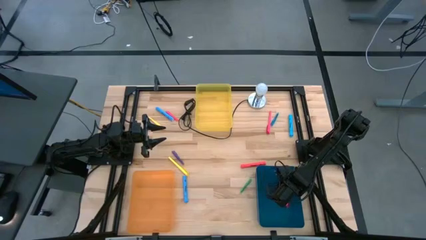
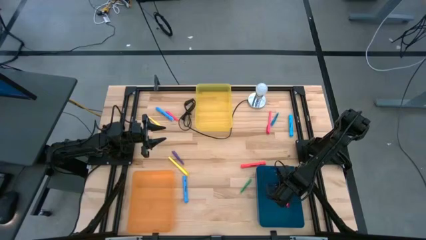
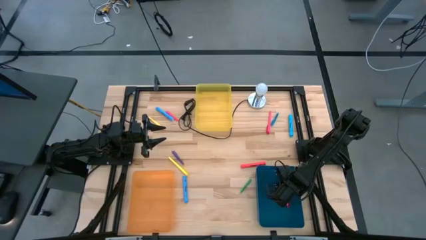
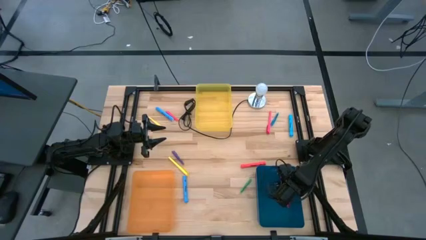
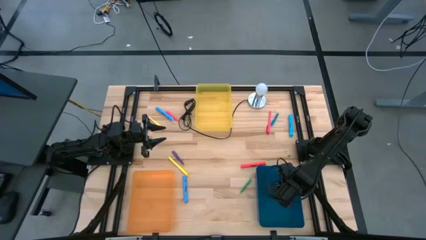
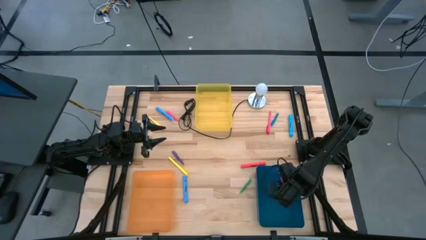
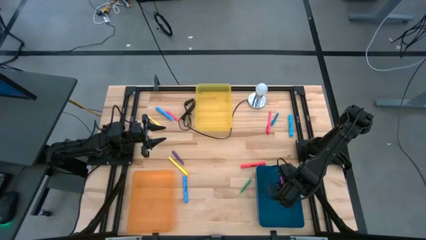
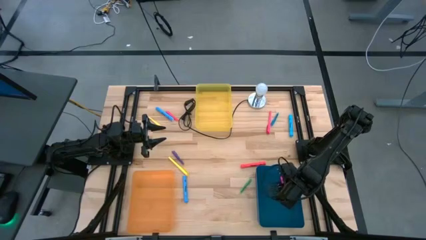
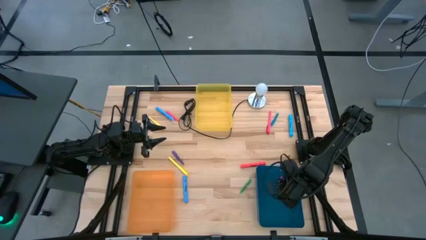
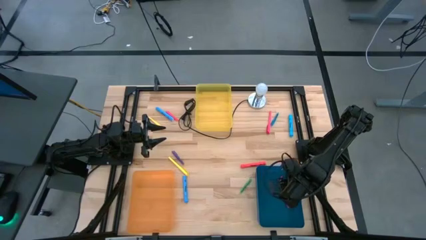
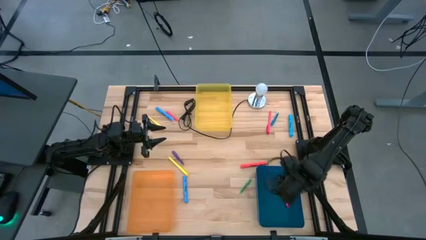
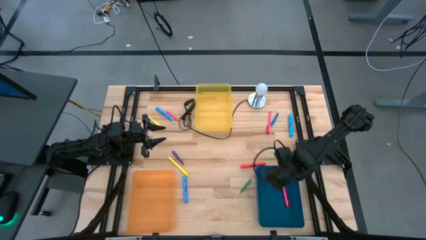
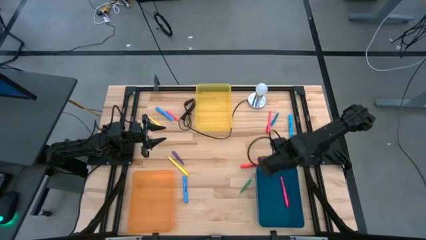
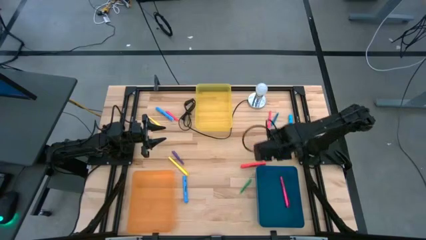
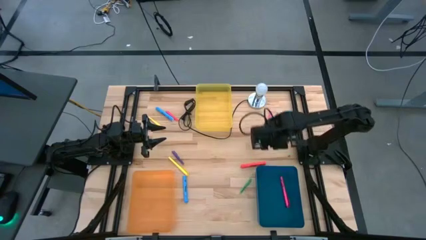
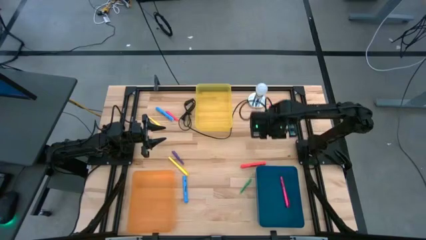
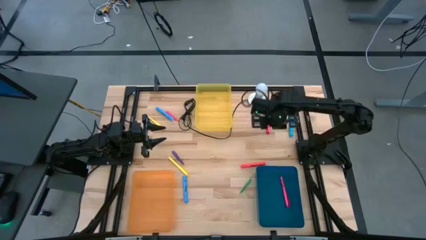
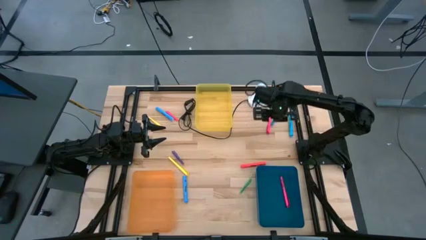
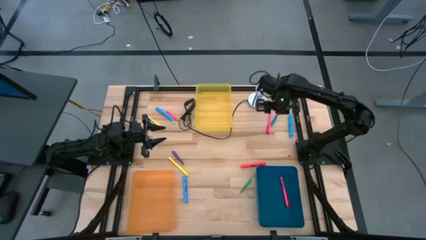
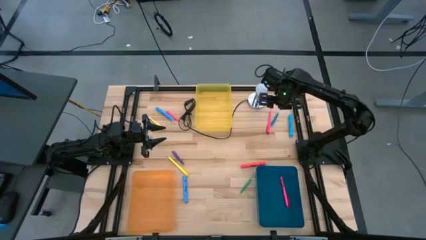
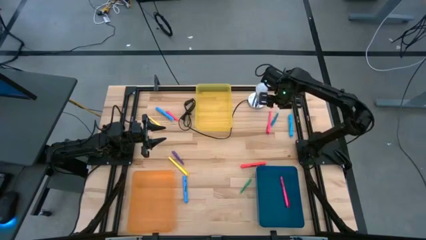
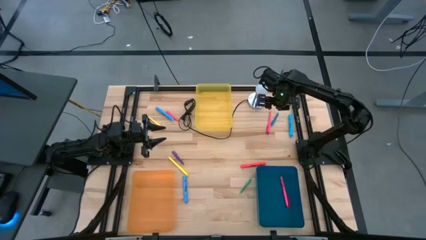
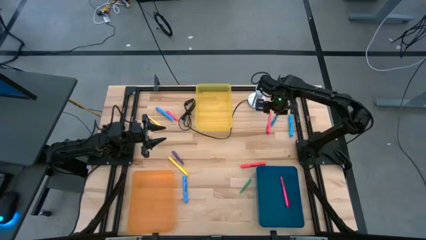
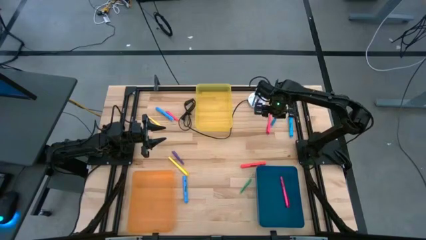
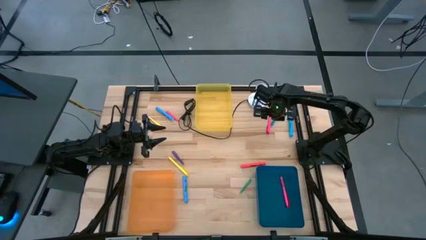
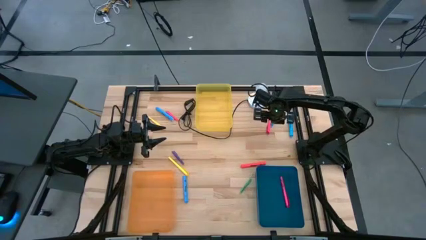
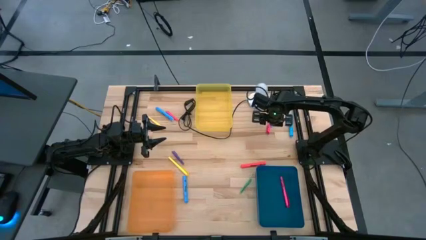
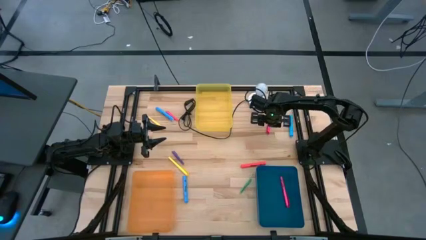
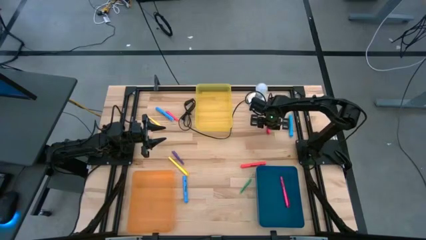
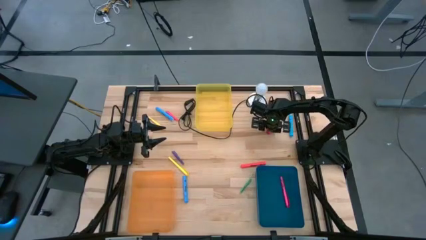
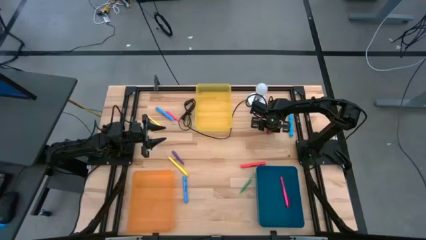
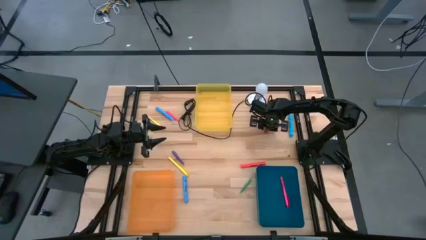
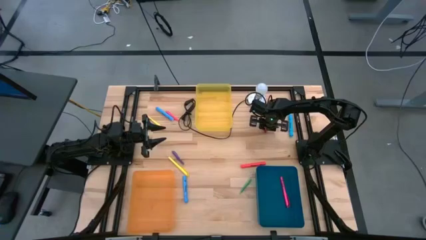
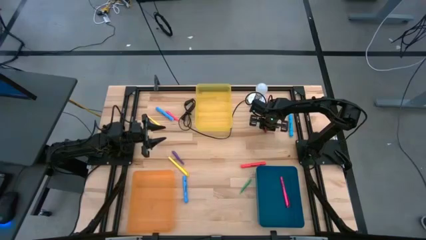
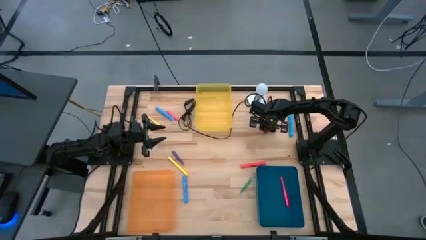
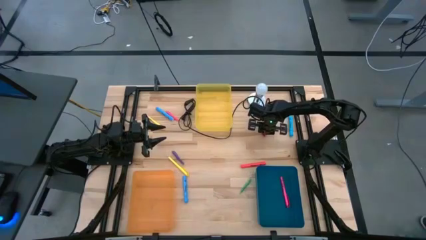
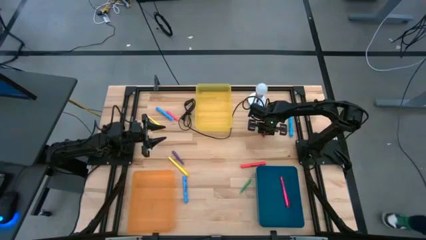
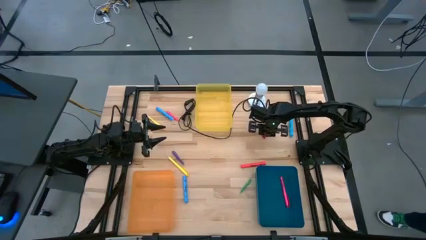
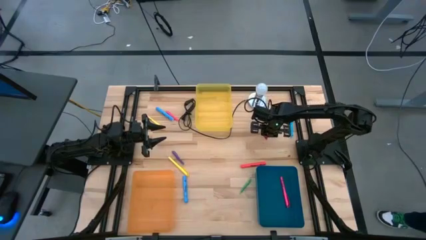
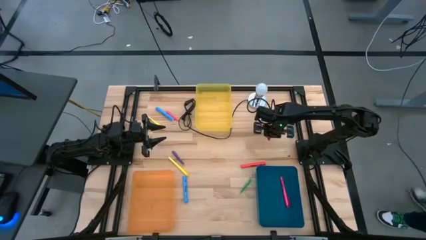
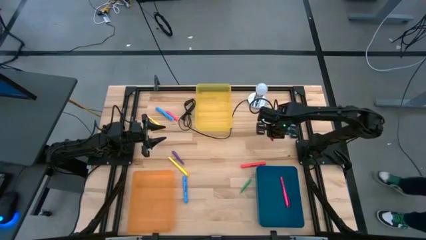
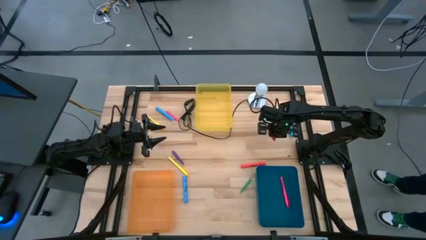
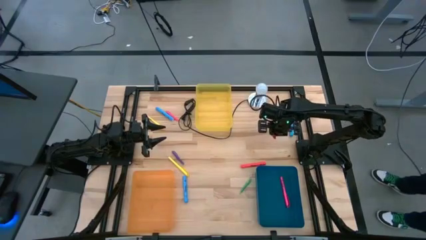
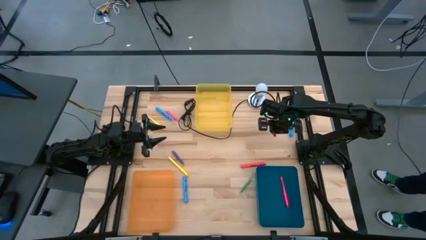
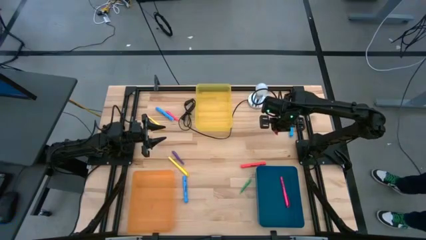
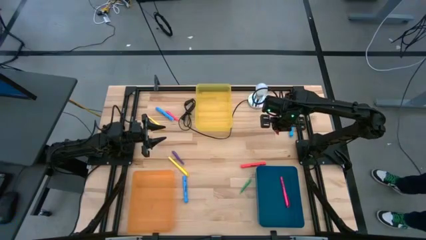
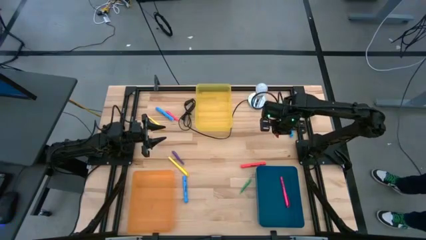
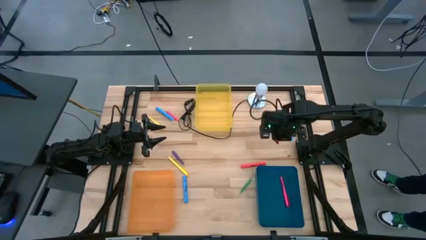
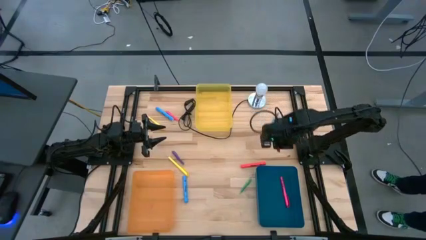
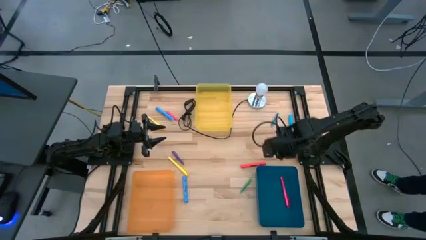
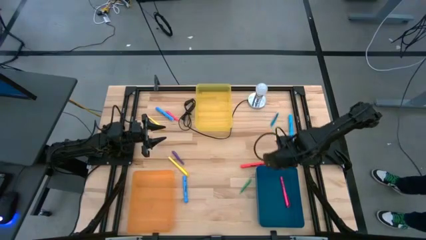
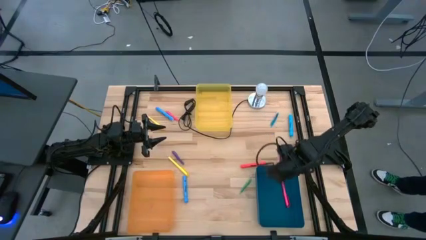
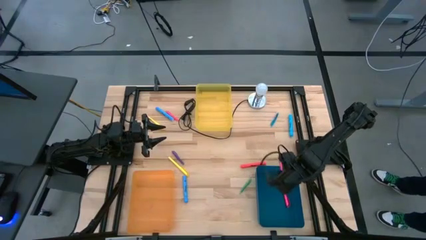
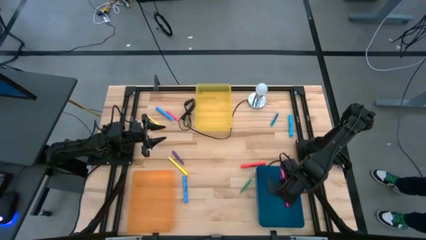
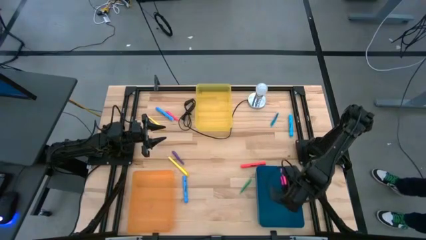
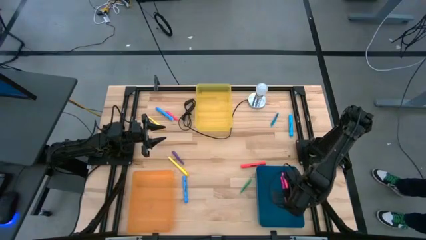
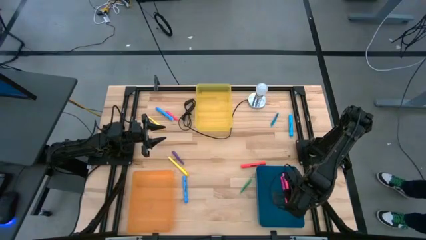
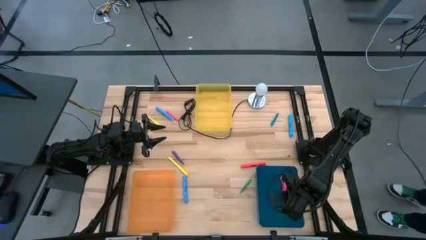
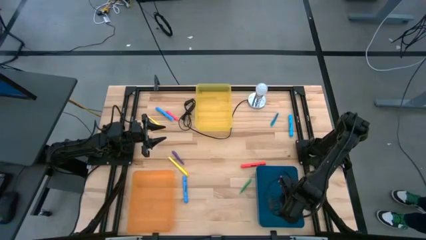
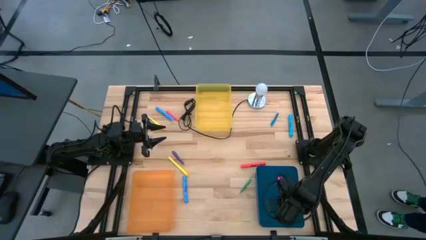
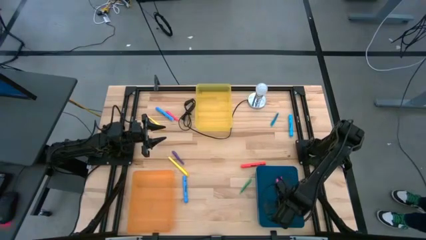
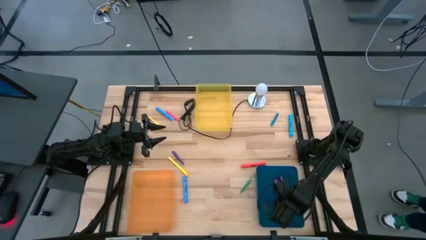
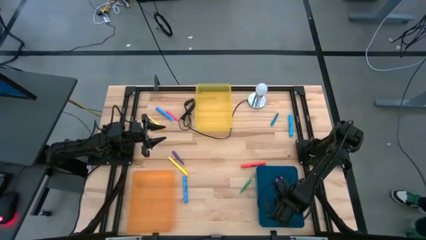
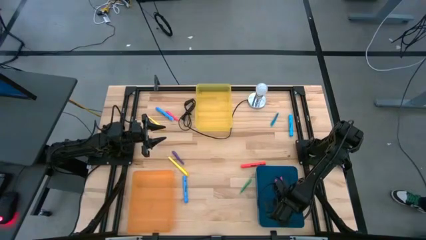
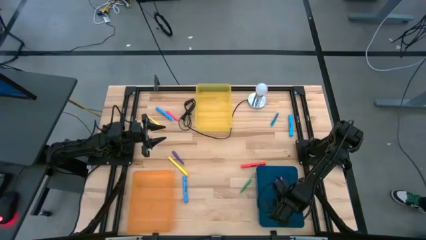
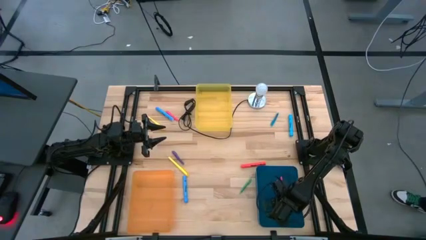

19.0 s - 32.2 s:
Task: Pick & Place Markers
Put the pink highlighter pen into the blue bin
